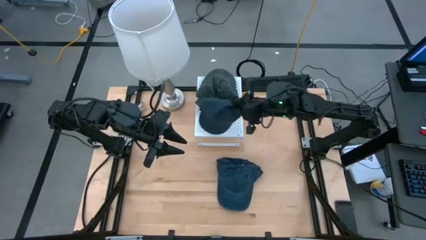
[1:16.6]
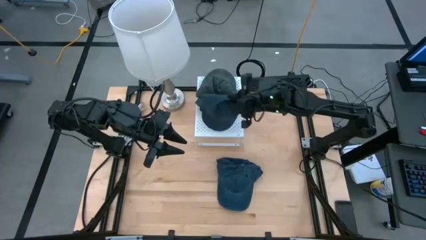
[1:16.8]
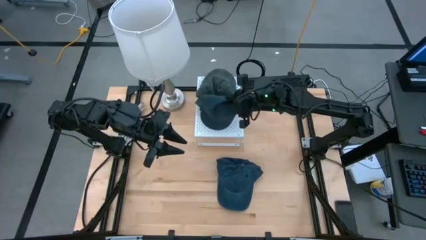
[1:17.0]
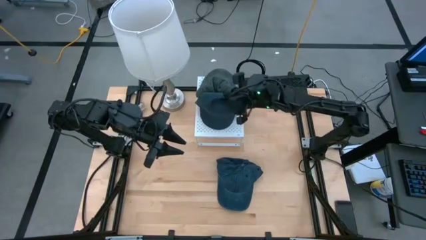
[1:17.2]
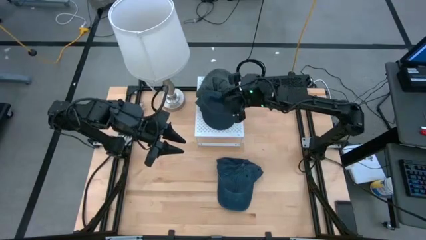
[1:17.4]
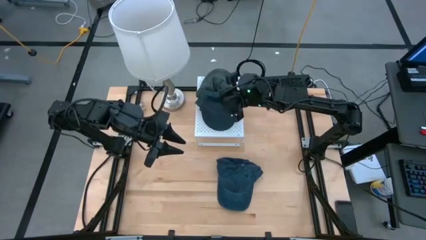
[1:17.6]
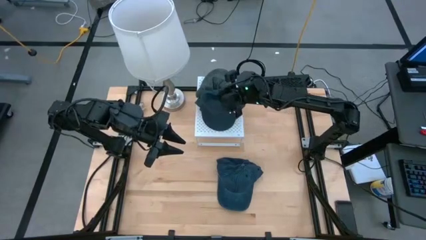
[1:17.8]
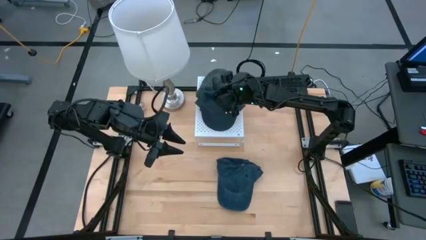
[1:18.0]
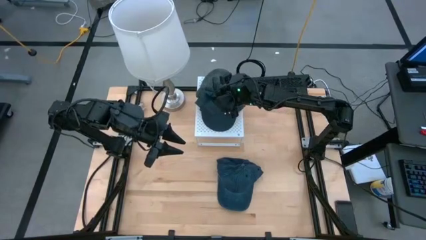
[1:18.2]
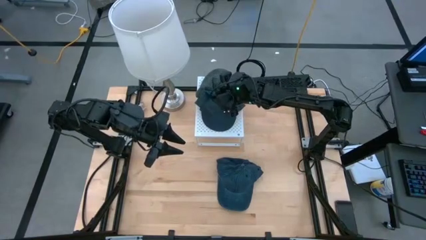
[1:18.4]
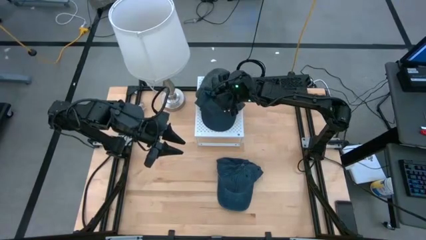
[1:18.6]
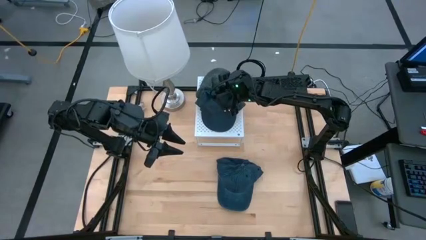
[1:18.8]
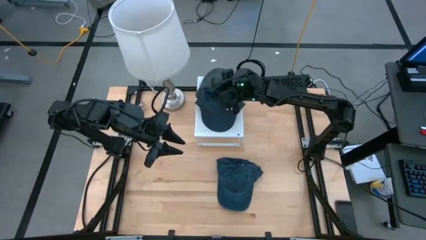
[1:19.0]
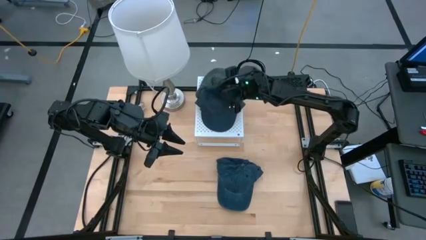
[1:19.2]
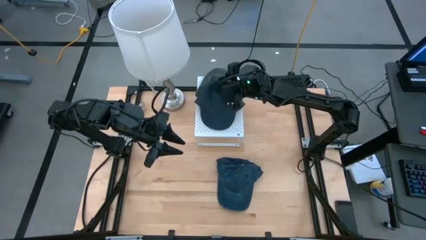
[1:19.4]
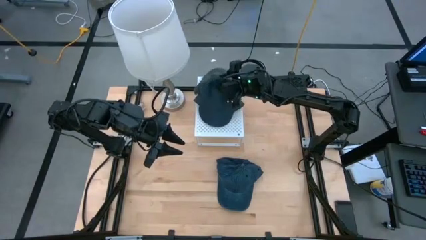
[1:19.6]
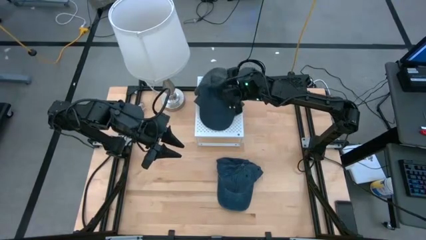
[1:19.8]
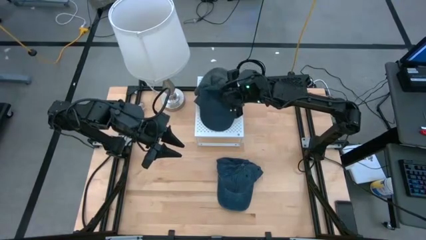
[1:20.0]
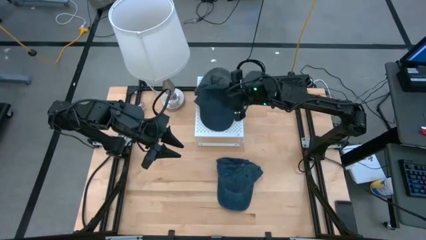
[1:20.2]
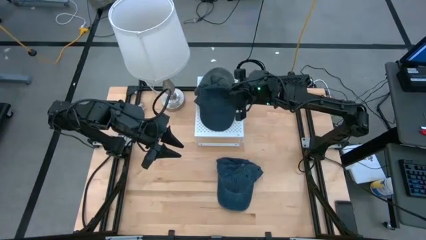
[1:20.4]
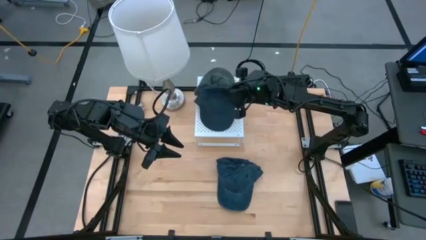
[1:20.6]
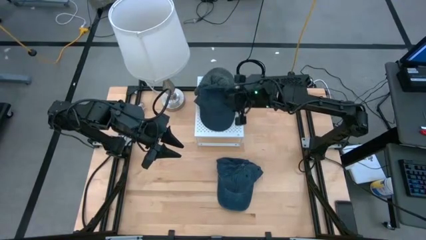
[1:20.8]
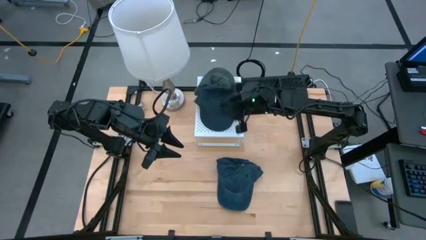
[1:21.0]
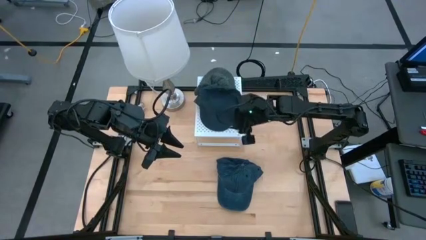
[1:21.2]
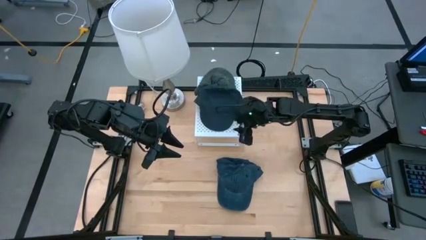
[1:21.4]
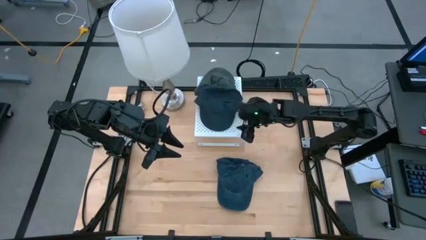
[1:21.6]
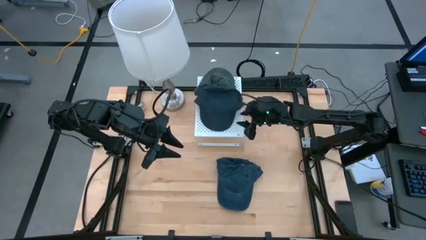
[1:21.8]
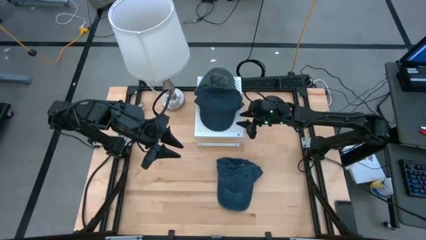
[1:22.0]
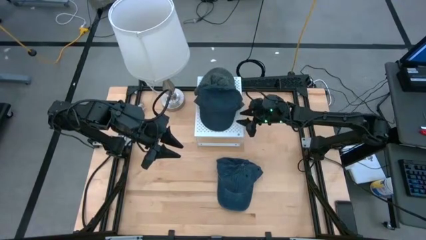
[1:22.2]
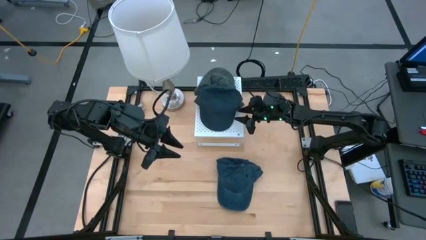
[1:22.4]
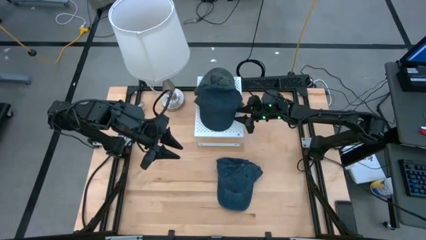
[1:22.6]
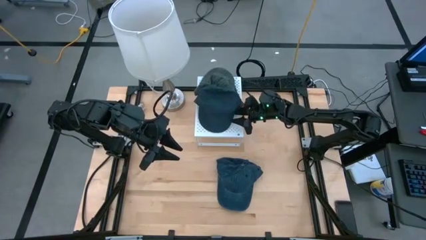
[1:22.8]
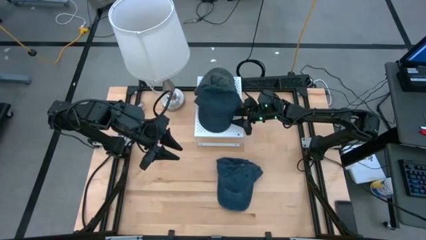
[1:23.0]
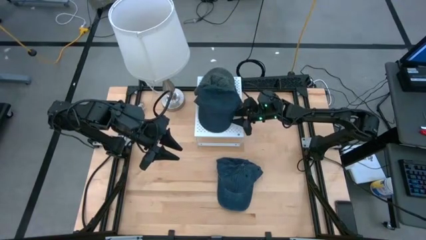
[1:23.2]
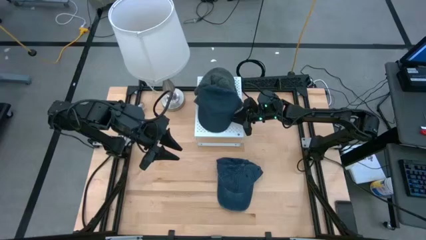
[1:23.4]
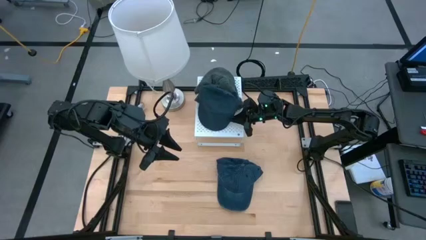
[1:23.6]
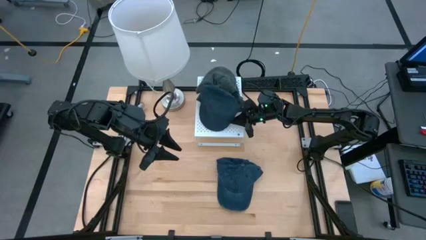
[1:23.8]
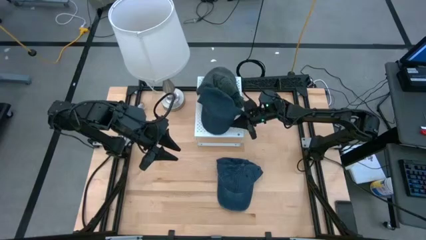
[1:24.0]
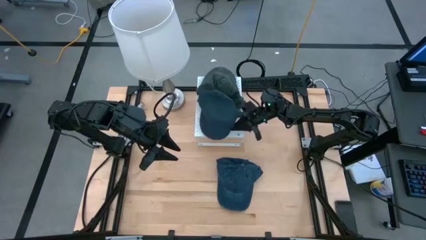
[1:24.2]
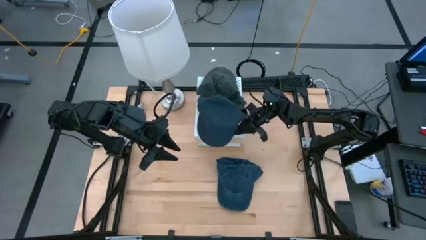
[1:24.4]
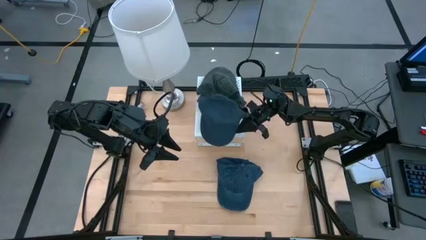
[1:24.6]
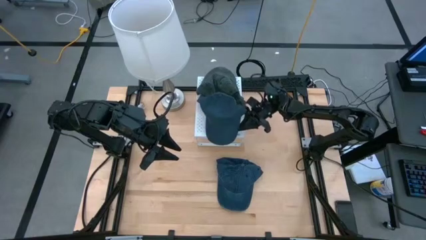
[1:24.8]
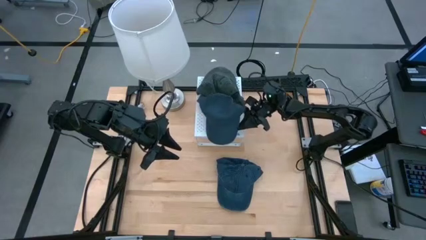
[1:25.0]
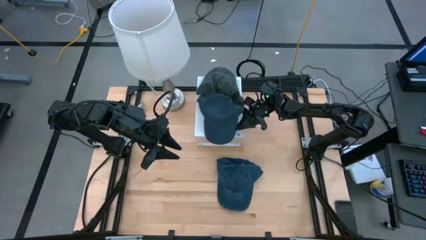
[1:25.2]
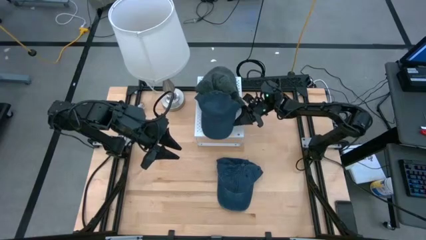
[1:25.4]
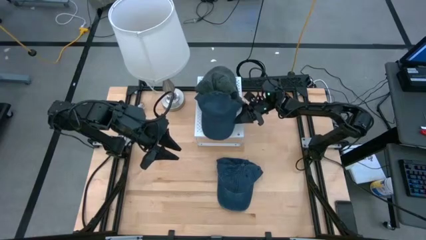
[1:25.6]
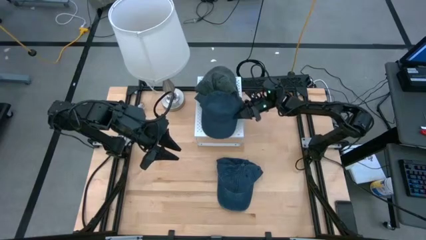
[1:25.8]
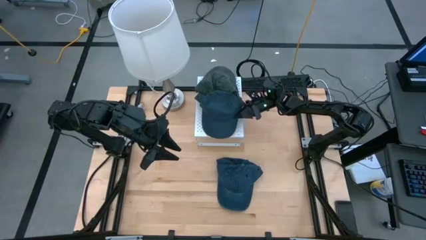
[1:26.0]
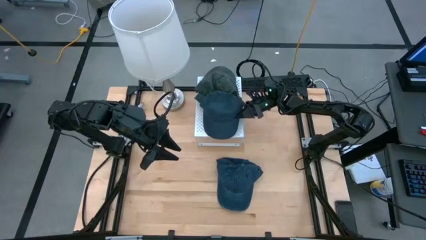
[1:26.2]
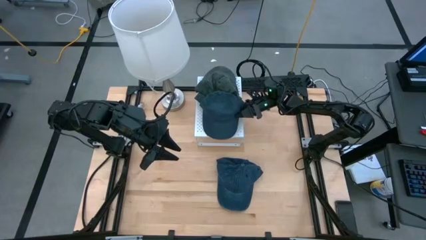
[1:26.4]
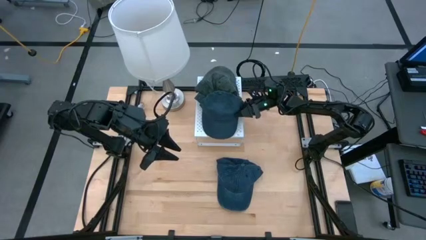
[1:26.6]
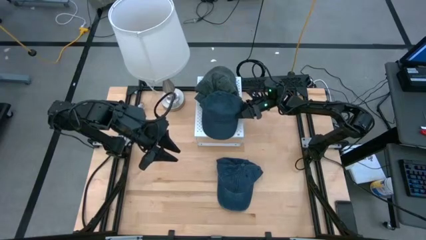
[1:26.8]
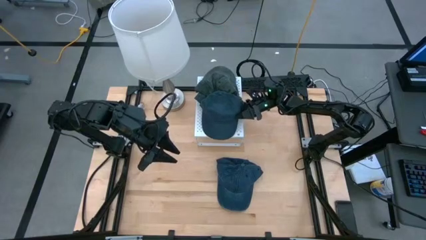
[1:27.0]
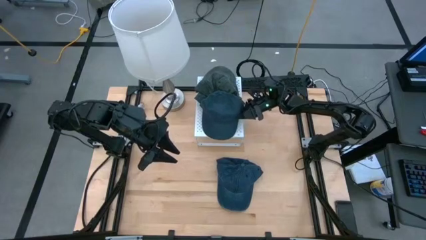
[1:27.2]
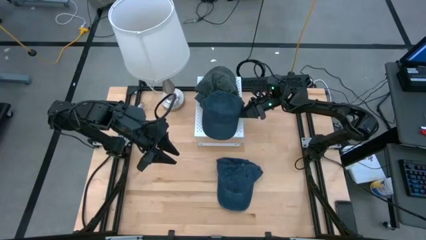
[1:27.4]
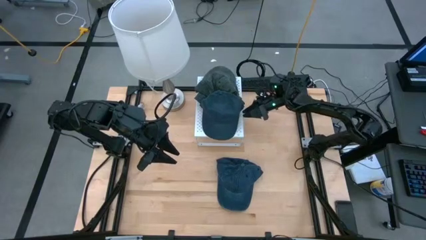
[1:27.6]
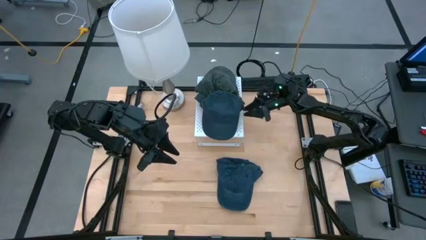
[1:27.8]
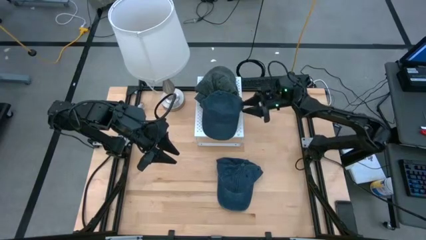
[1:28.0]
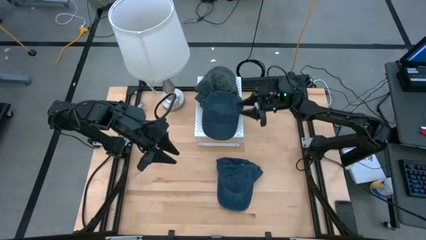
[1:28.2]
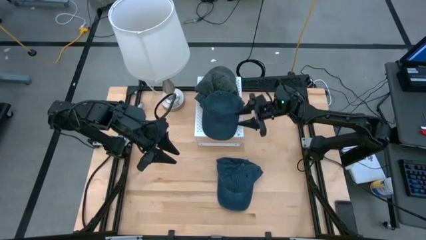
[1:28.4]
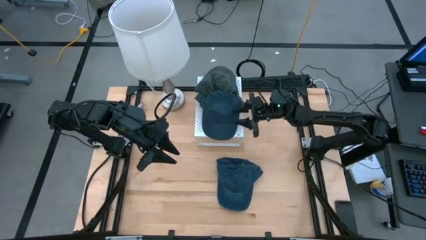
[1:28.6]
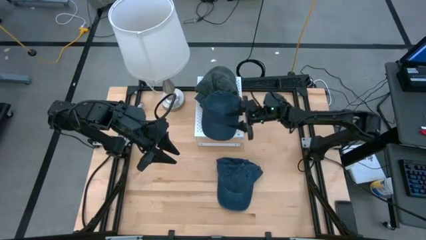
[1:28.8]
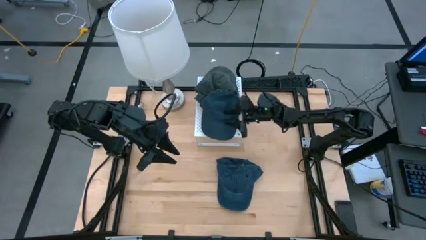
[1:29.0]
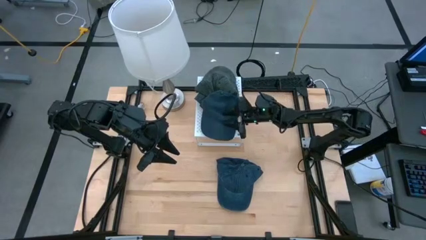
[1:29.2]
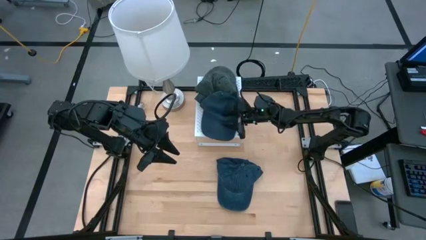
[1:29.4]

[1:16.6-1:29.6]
Task: Pick & Place hat
Put the blue cap on the shelf

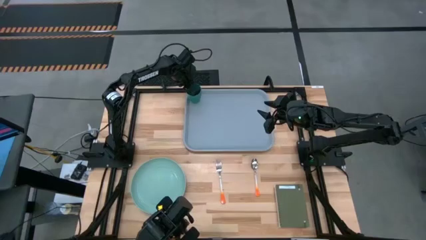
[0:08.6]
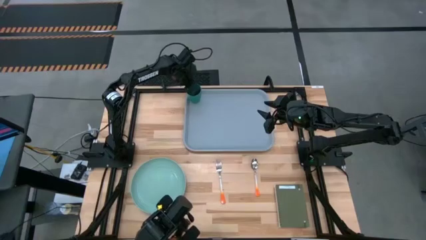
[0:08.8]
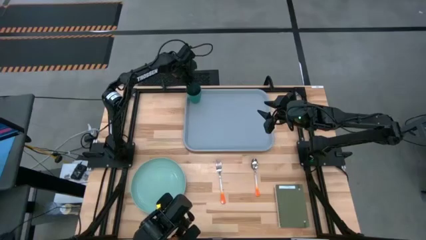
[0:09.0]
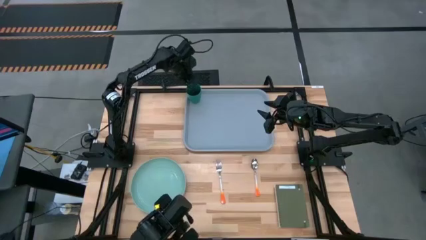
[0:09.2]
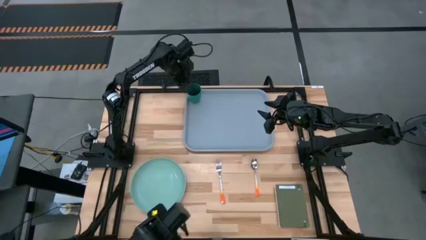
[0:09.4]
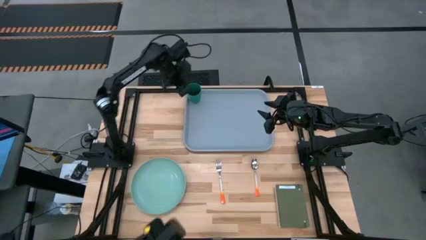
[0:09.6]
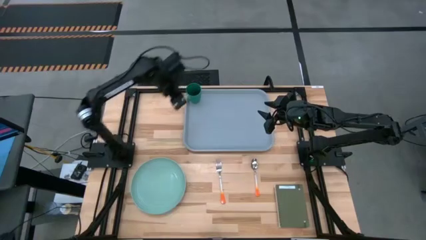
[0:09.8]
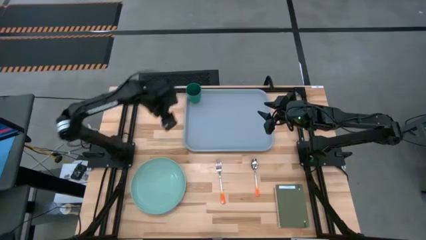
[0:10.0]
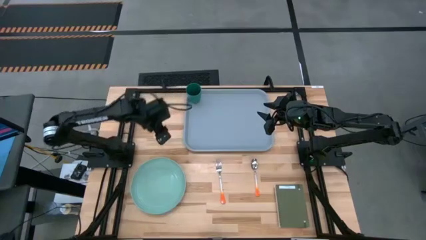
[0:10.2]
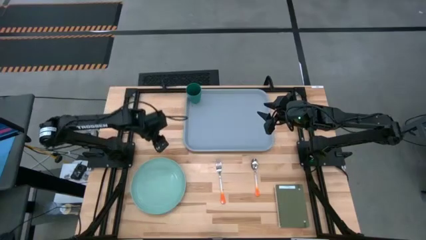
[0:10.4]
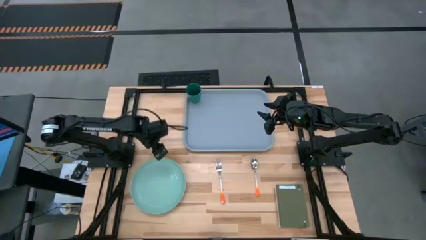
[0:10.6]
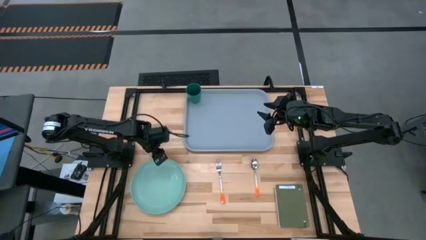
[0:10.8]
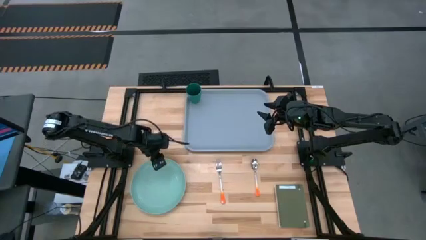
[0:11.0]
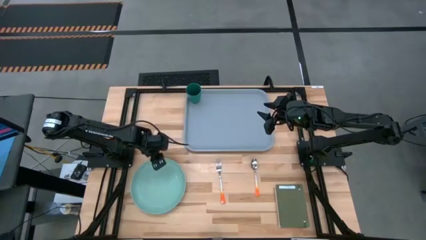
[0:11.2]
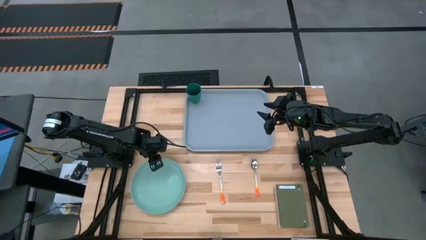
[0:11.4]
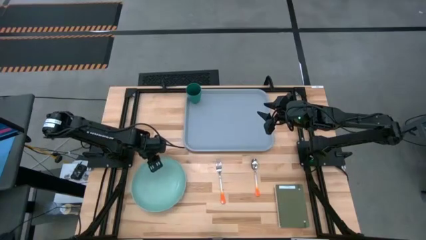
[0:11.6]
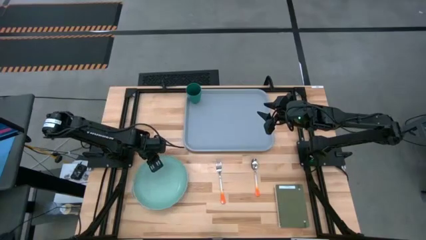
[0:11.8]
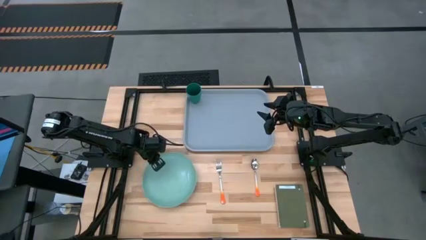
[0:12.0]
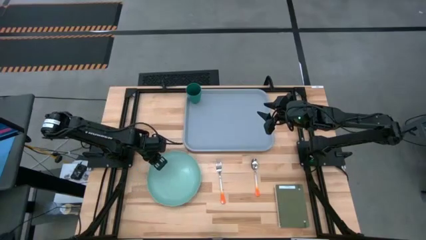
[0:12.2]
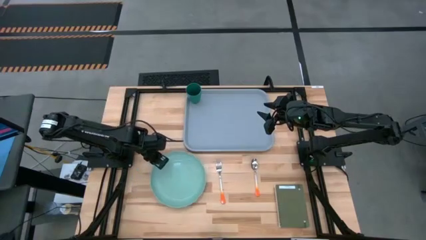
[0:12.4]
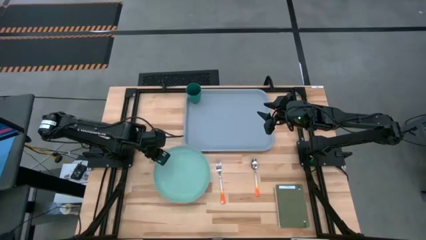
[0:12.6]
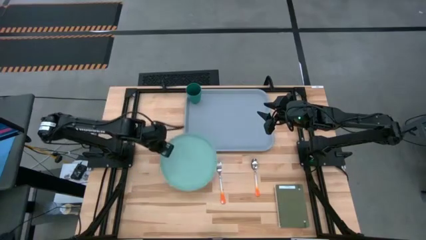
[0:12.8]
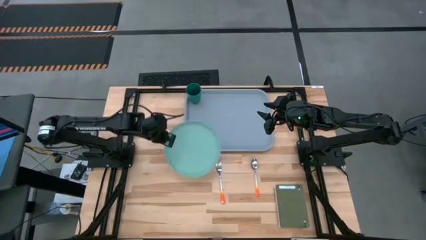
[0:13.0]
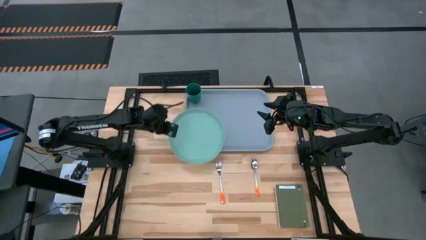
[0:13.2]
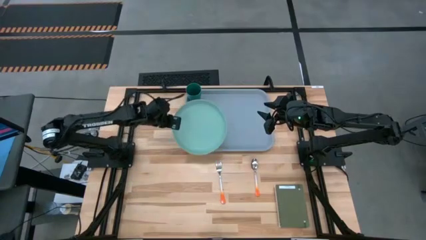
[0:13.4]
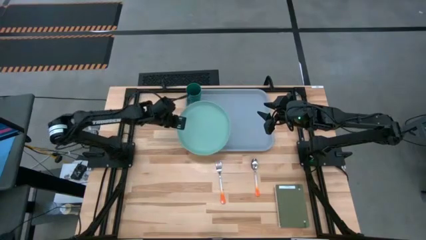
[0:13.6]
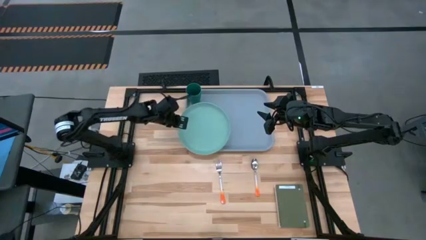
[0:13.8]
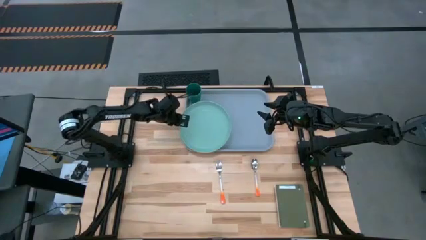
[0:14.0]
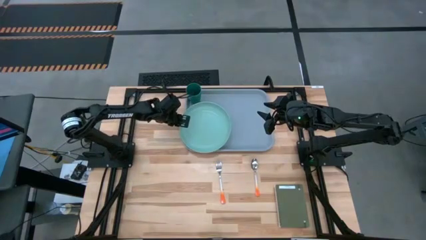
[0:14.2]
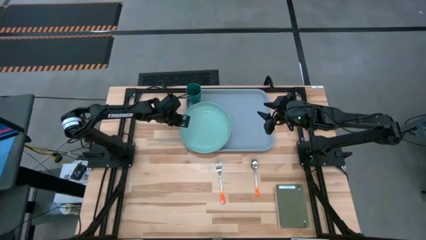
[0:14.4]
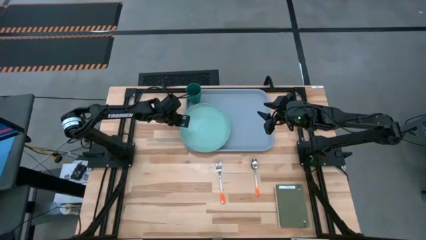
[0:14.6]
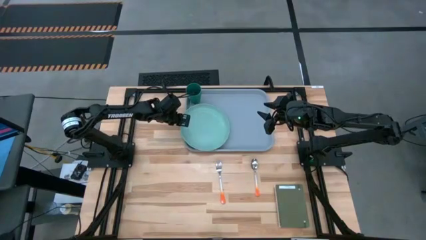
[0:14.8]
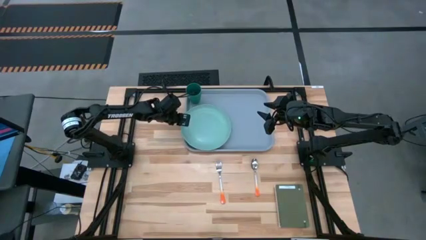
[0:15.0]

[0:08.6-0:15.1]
Task: Pick and place plate/cup/fork/spoon on tray
Put the light green plate on the gray tray to the bottom right of the dark green cup
